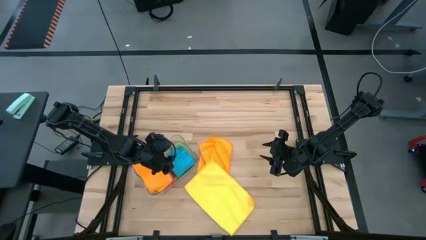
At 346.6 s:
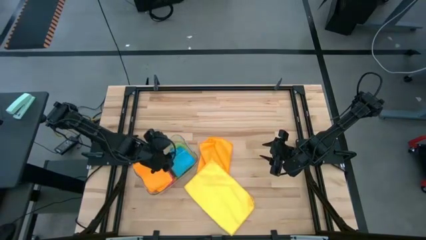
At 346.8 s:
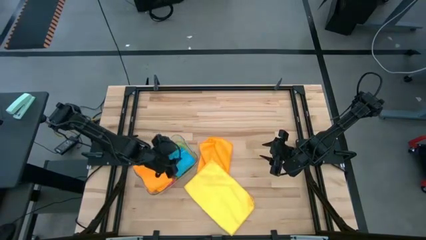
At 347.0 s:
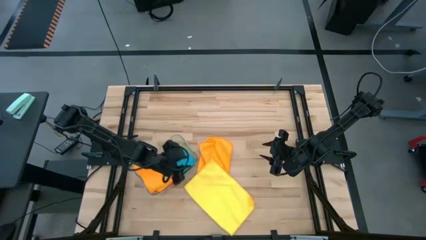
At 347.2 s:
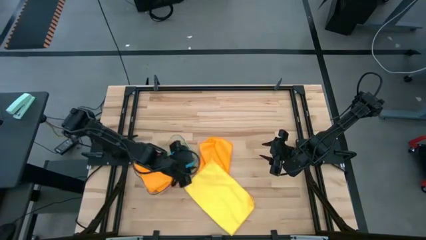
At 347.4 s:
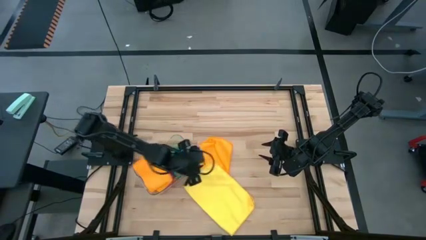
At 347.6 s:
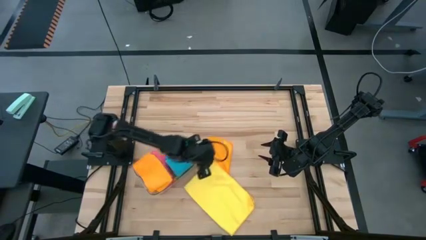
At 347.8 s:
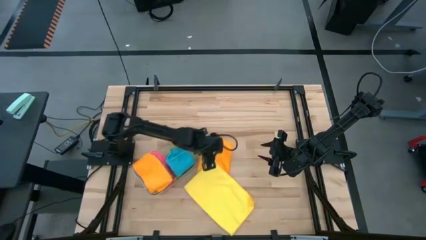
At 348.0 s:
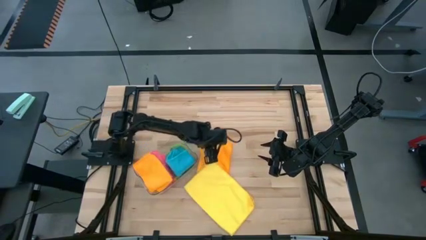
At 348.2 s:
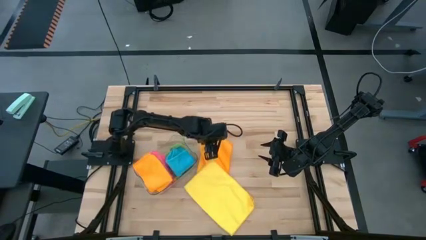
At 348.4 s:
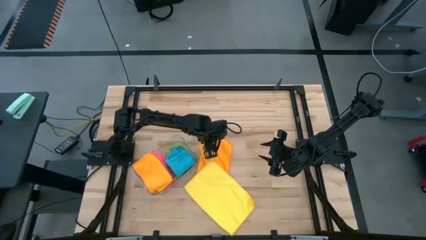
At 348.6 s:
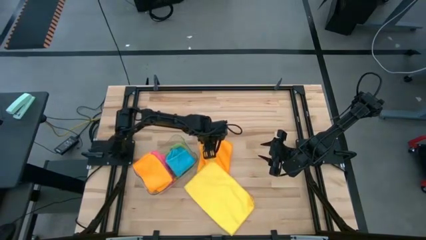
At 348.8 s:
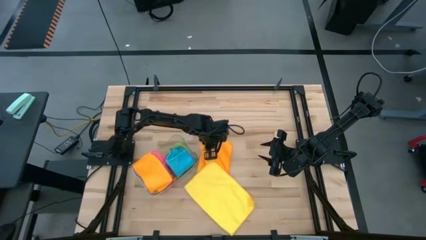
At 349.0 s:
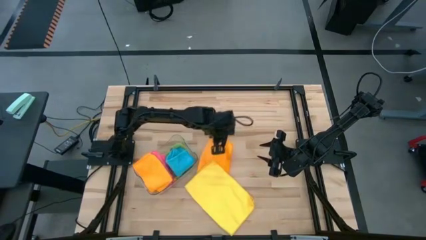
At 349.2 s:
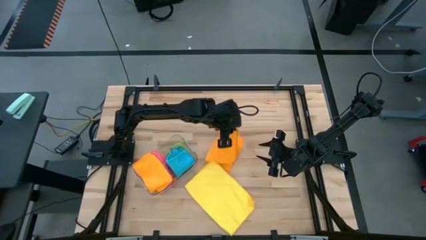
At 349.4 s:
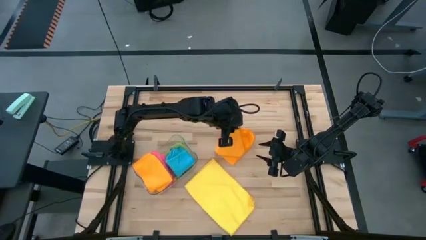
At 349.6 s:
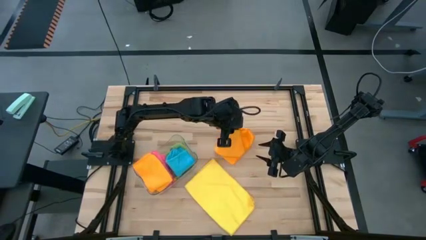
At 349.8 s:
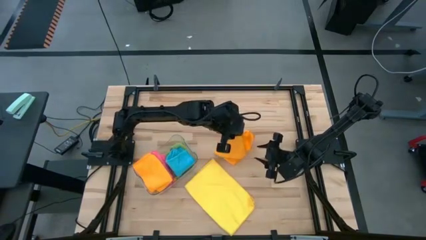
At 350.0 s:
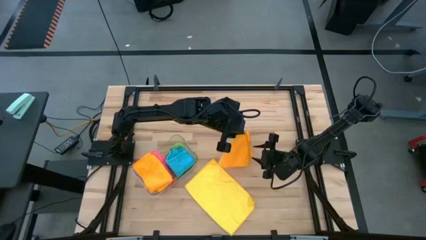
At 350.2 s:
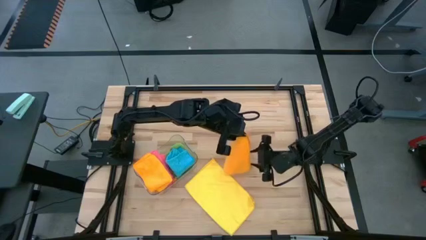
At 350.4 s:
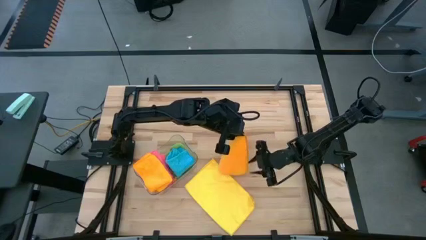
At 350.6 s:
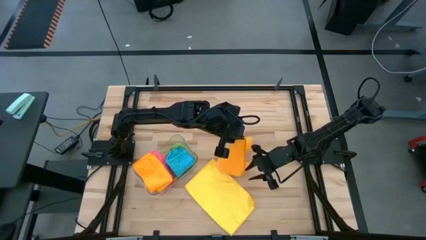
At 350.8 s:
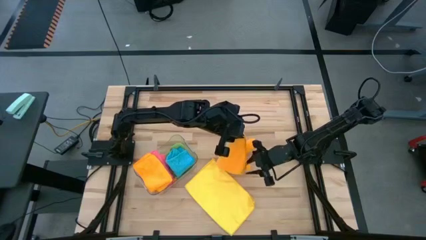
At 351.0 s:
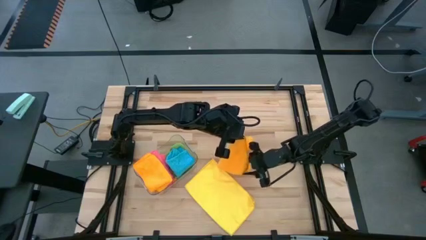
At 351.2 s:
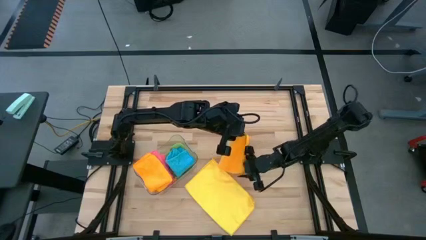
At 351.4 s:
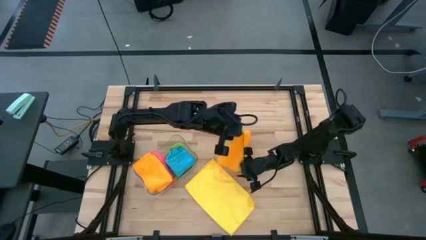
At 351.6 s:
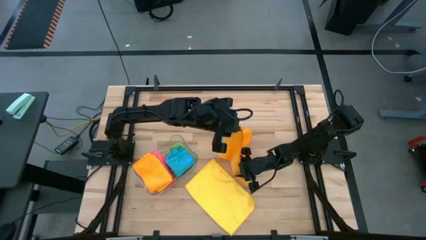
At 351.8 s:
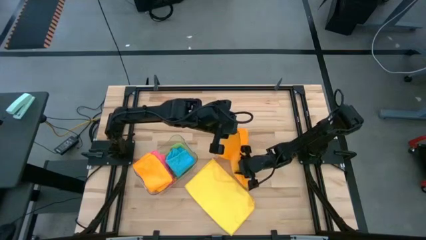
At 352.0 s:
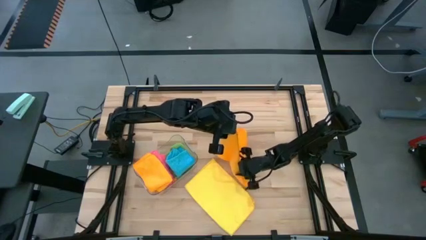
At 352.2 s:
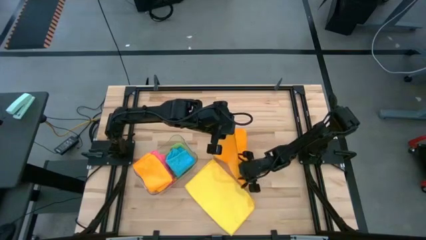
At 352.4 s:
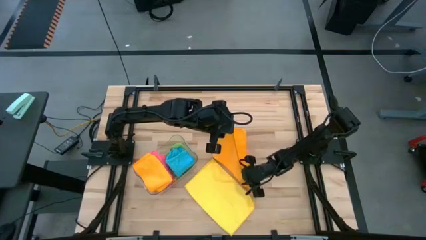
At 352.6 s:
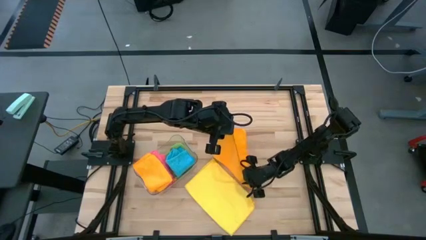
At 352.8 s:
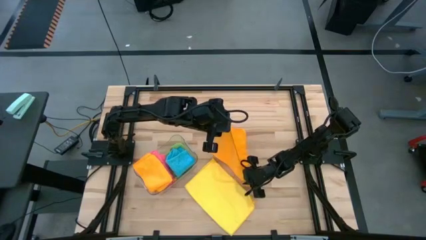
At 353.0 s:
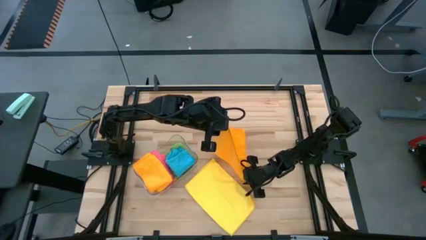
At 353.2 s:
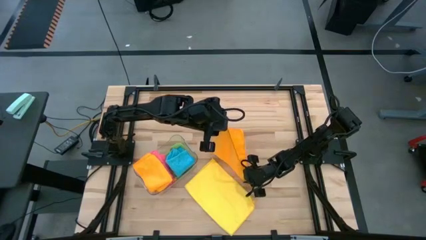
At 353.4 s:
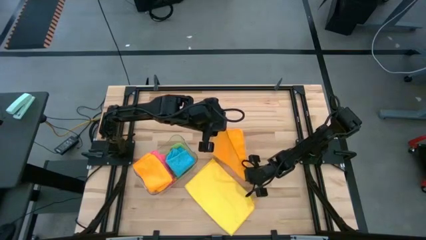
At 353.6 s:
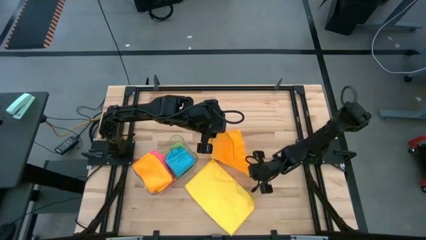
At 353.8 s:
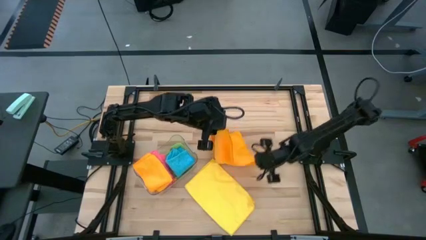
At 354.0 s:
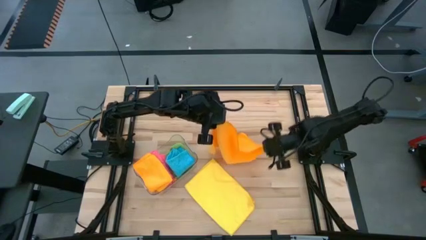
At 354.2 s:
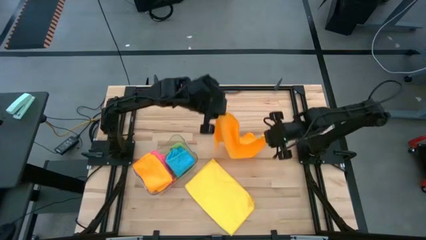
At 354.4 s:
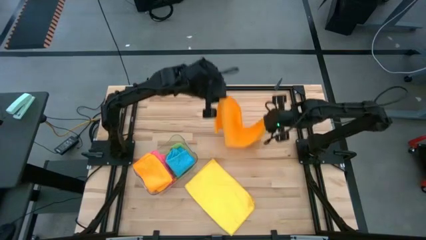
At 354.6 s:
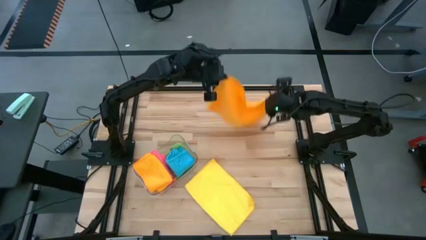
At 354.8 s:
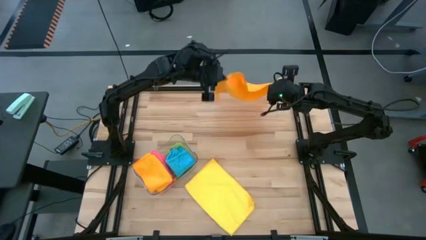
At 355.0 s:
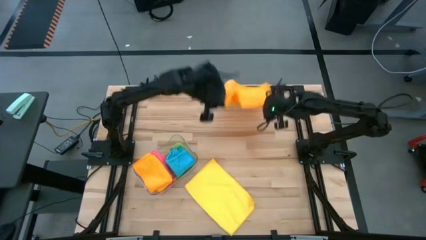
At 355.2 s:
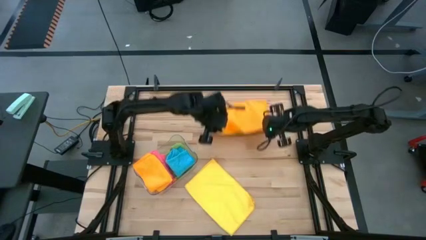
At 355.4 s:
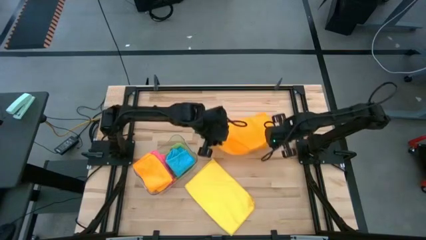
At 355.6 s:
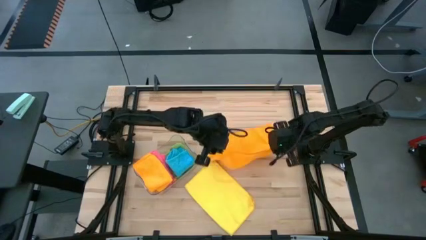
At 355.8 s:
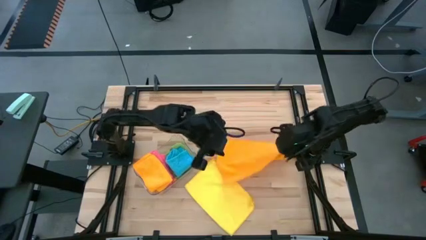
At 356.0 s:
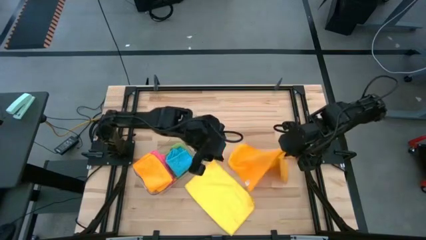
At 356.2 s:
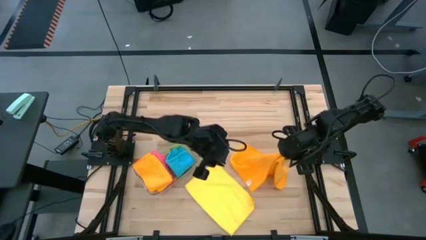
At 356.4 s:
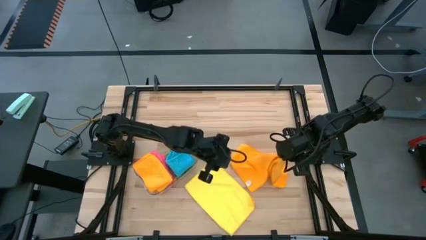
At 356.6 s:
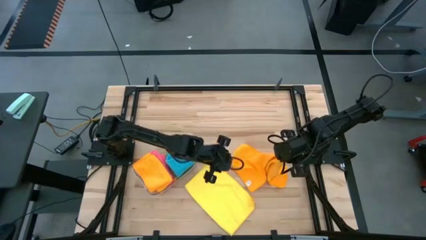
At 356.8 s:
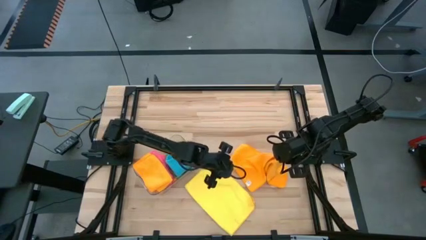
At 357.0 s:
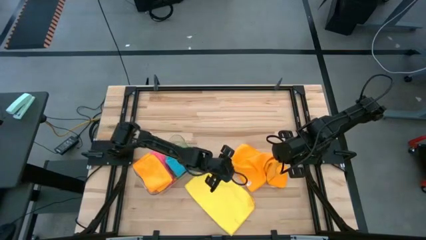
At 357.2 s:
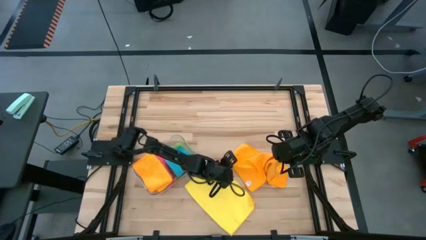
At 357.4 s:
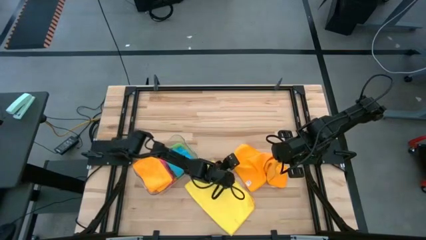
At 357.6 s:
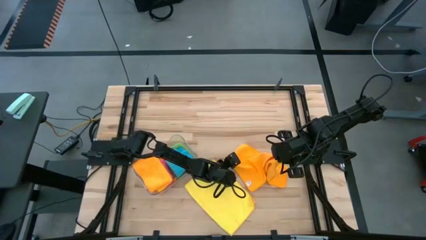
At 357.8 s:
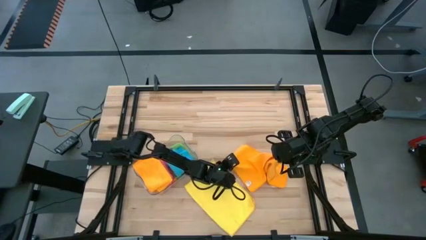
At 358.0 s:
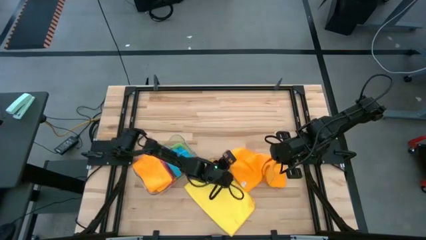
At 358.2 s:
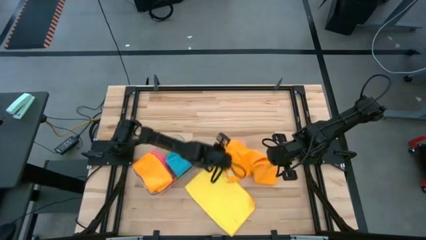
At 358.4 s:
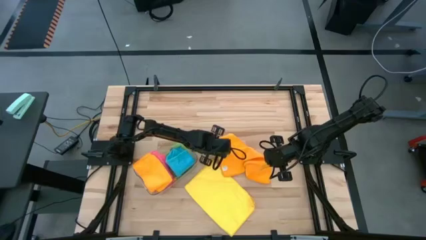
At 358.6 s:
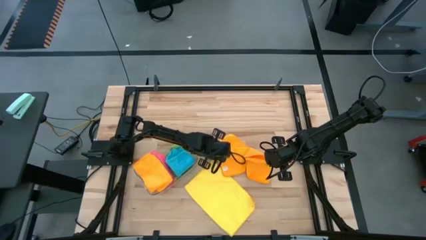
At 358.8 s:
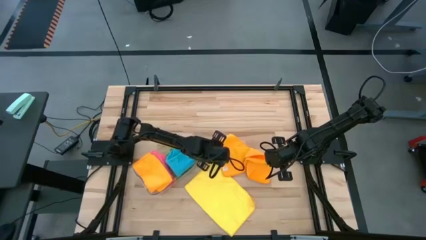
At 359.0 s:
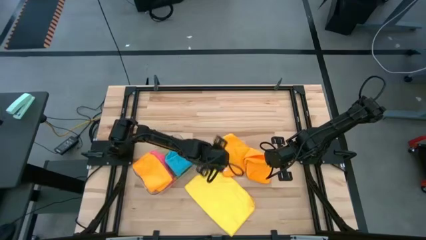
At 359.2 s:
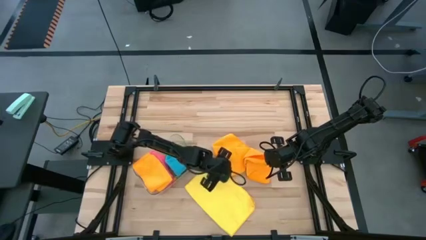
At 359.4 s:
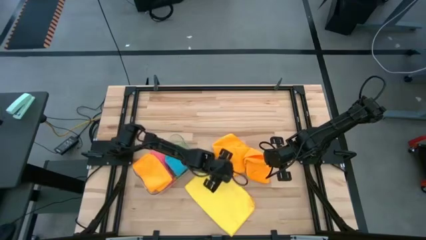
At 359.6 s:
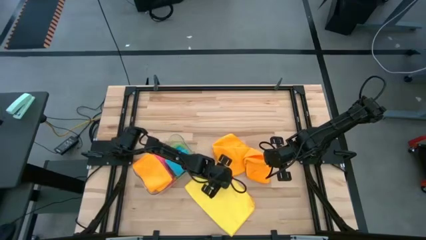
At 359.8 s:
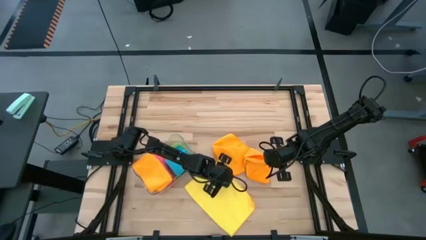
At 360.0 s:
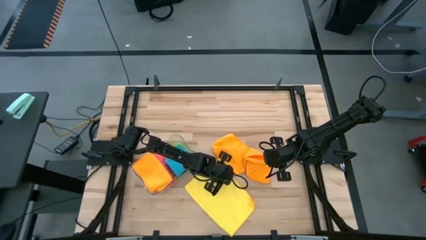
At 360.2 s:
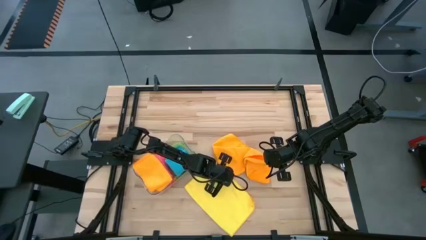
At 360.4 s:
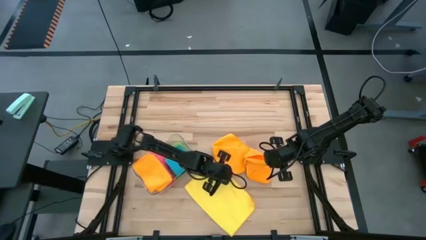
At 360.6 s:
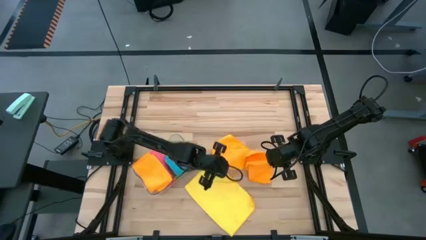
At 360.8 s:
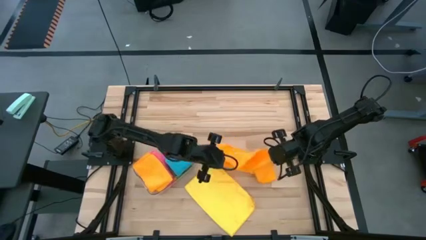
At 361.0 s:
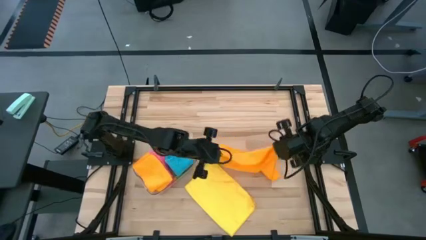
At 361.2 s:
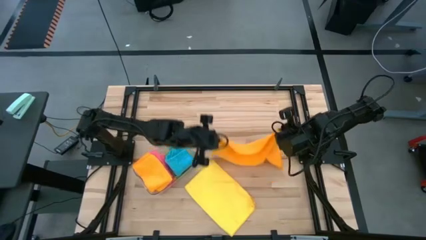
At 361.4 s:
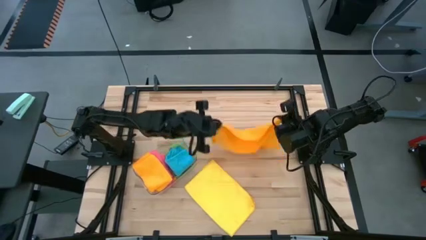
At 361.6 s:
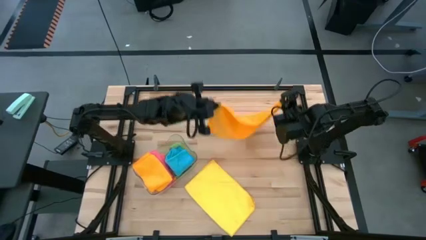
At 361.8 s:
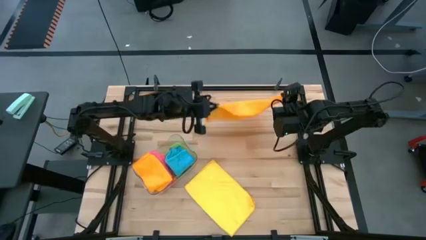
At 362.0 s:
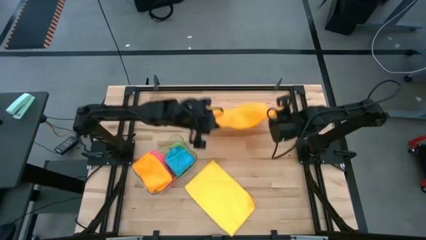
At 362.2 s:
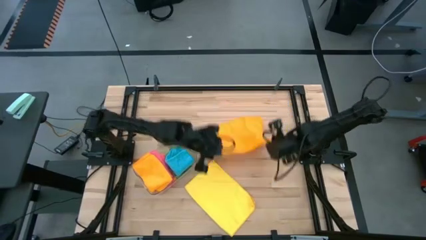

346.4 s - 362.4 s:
Task: Fold microfiber towels
Fold the orange microfiber cloth
